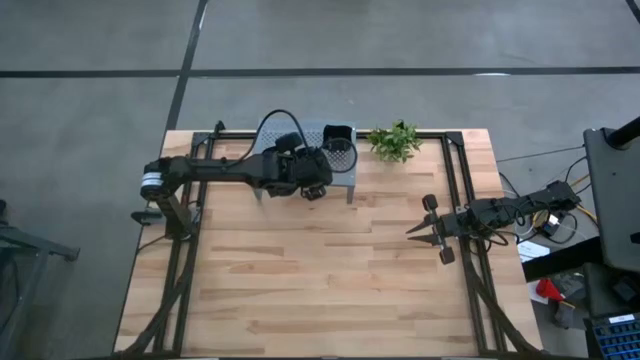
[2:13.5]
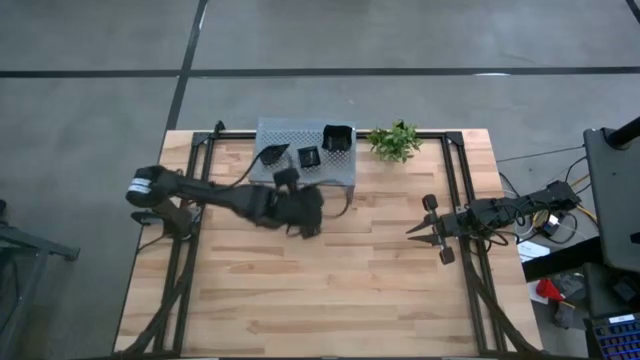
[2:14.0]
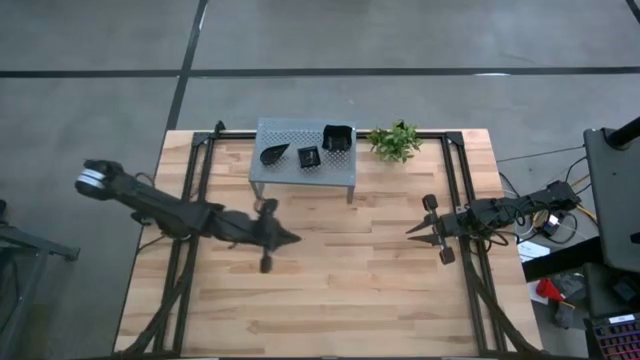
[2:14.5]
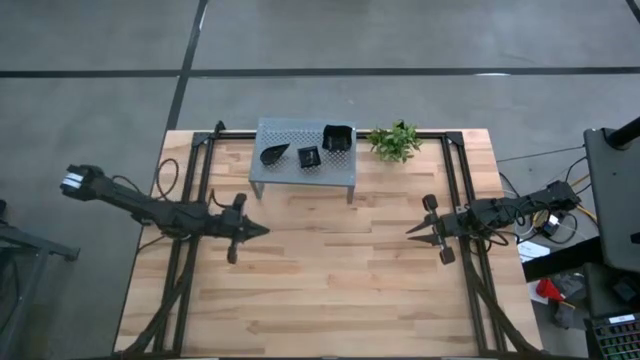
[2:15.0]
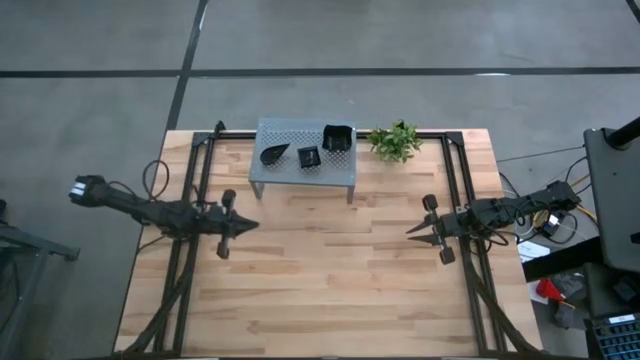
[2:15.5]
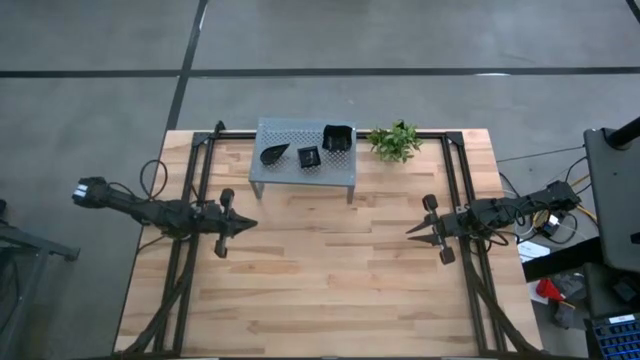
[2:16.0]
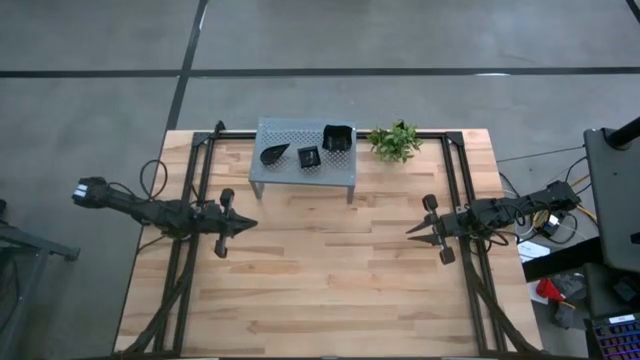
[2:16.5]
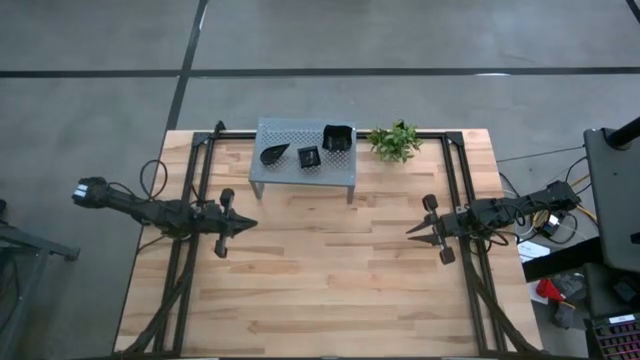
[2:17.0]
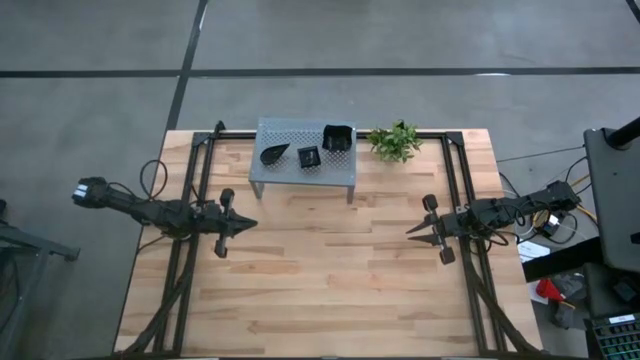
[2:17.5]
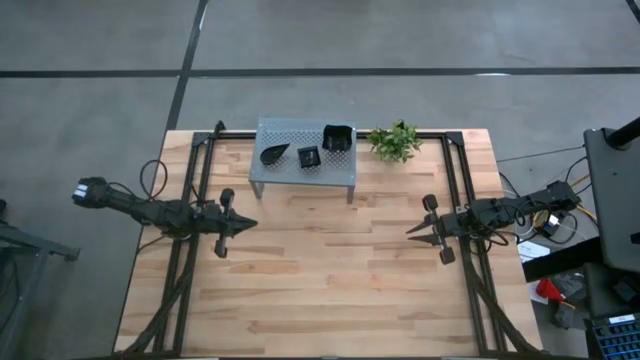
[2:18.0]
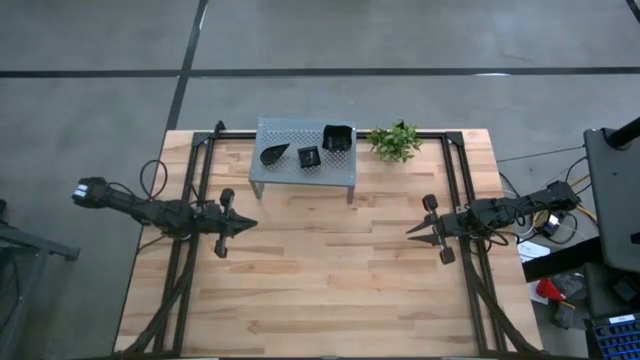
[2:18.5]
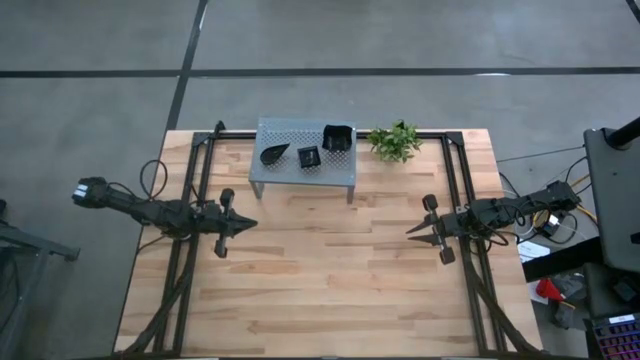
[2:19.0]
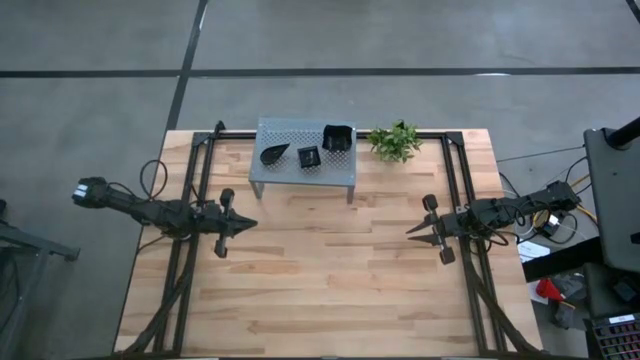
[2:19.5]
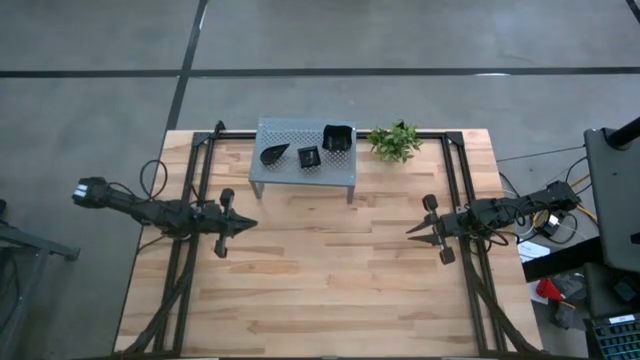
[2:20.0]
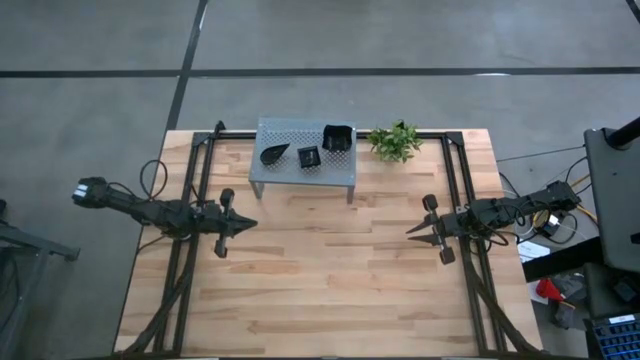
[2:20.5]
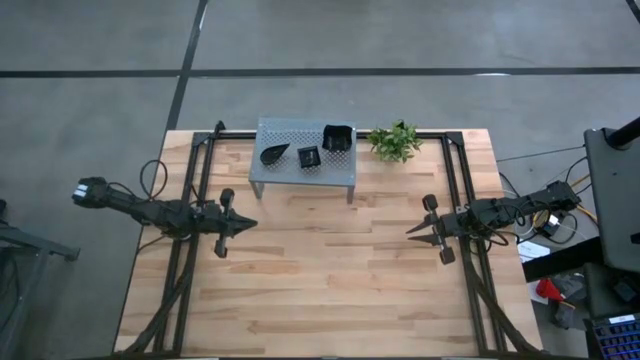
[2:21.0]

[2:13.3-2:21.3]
Task: Pick & Place Mini shaped plates
Return to Home Position

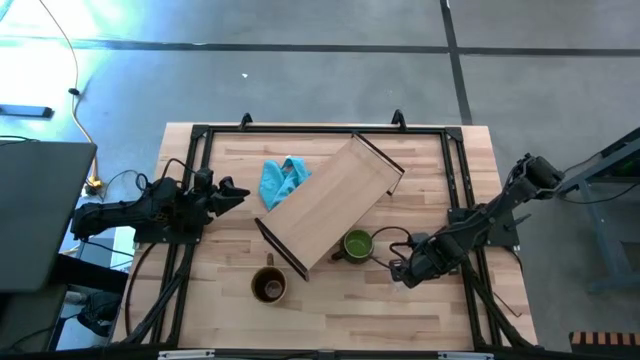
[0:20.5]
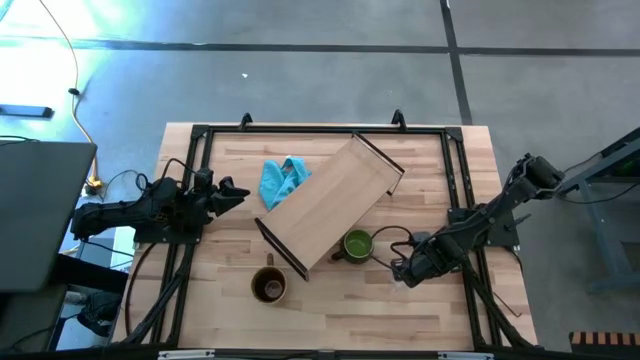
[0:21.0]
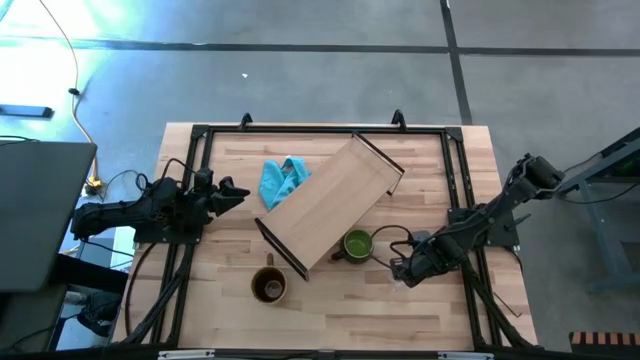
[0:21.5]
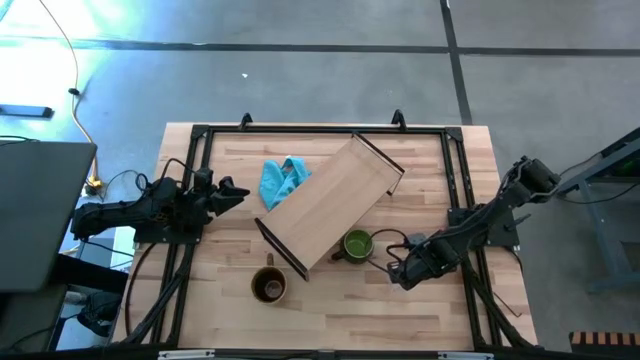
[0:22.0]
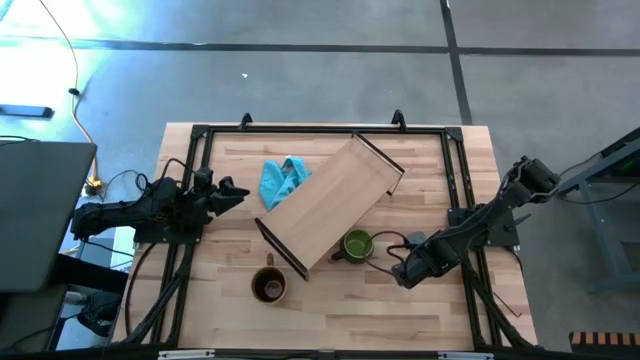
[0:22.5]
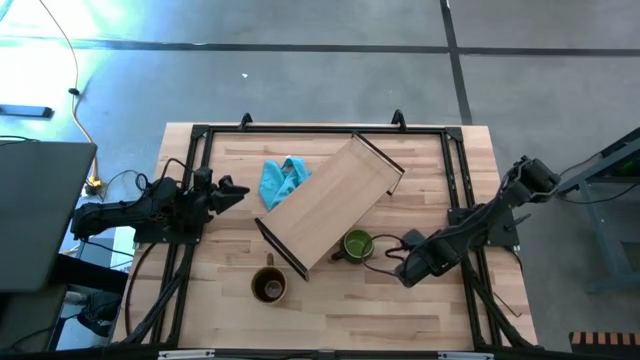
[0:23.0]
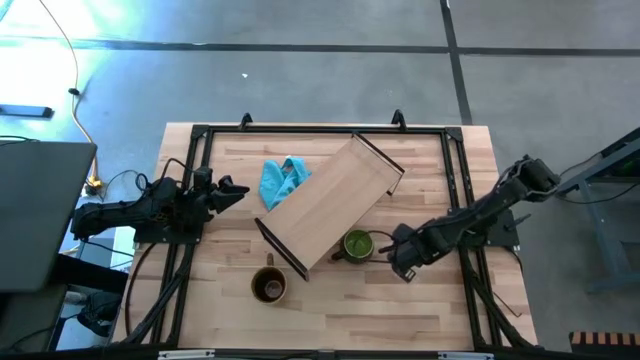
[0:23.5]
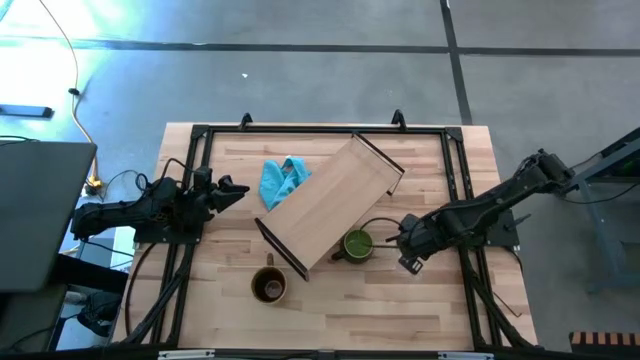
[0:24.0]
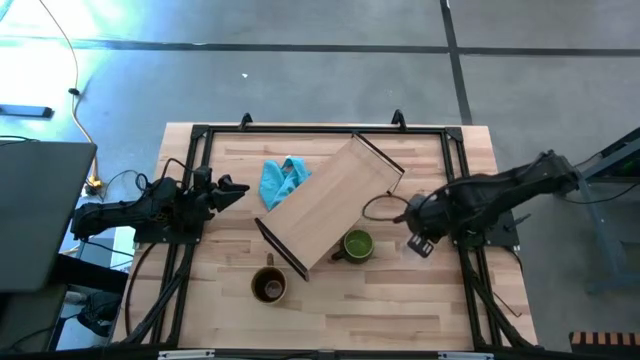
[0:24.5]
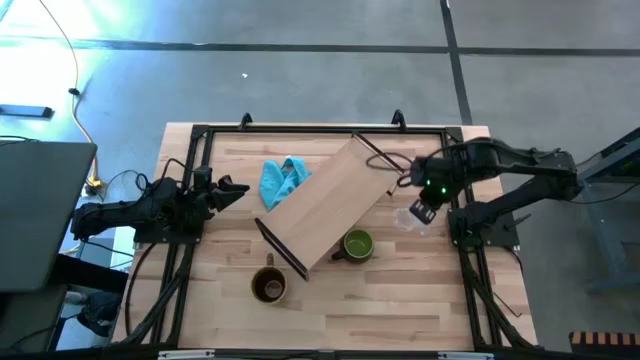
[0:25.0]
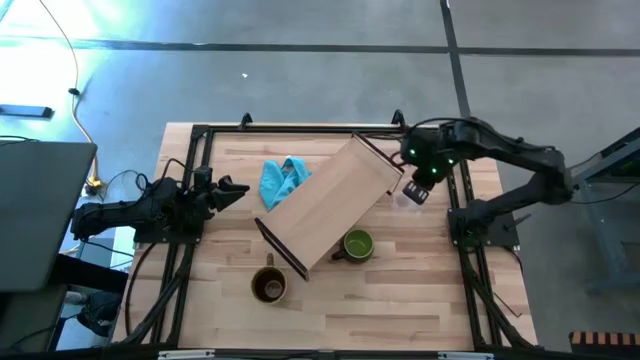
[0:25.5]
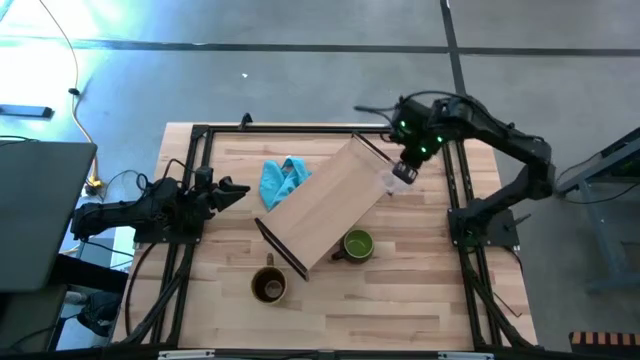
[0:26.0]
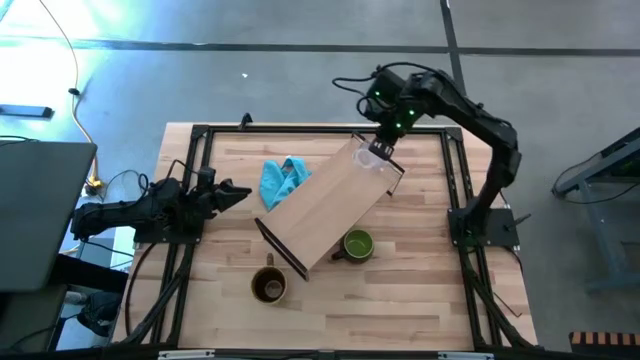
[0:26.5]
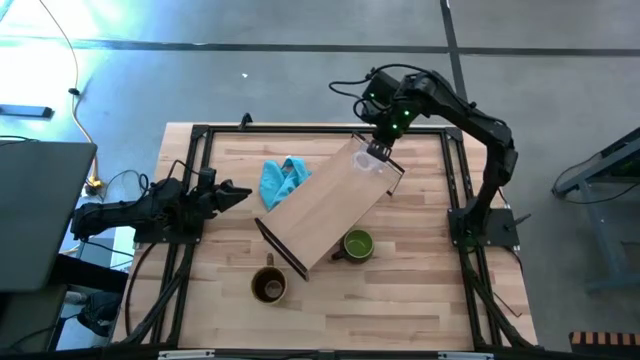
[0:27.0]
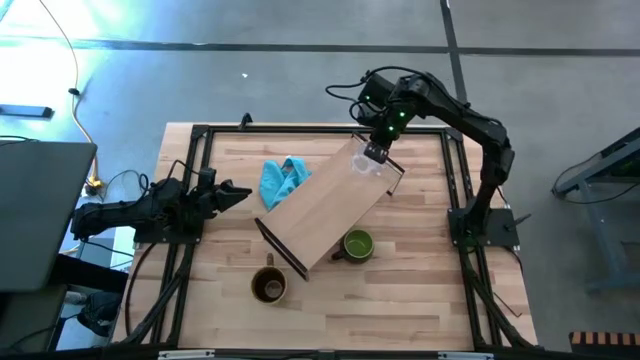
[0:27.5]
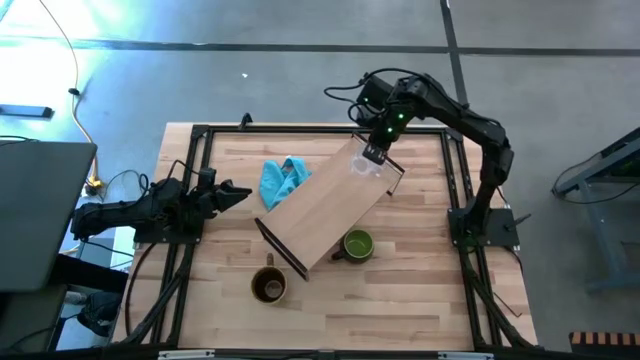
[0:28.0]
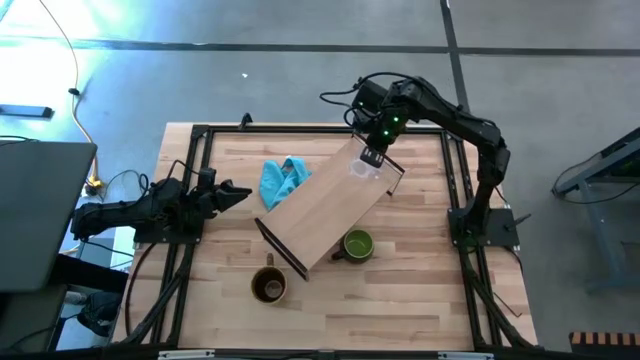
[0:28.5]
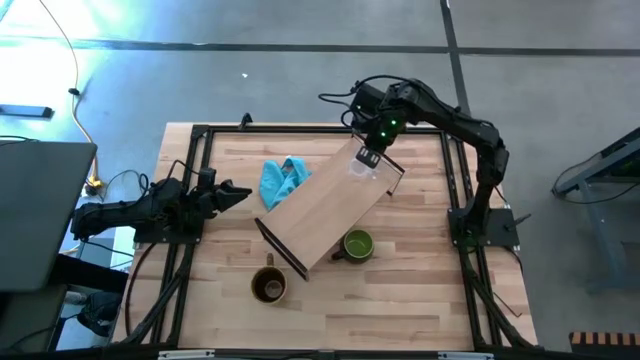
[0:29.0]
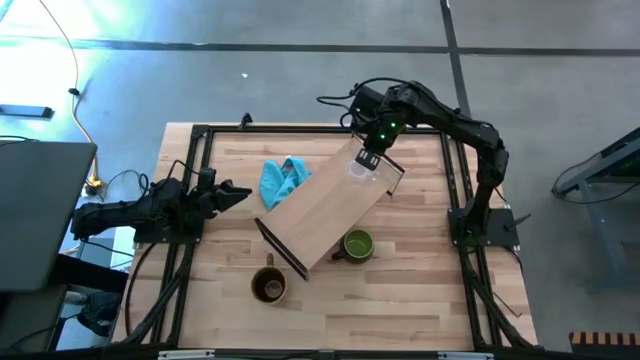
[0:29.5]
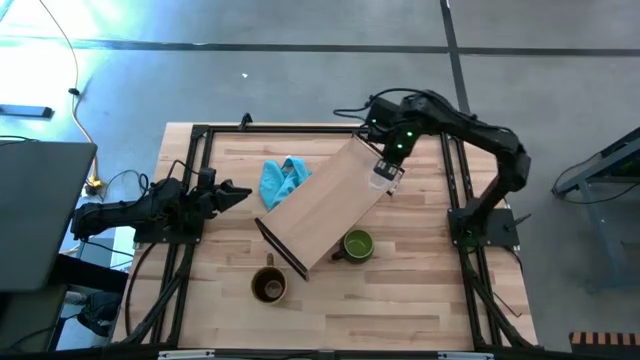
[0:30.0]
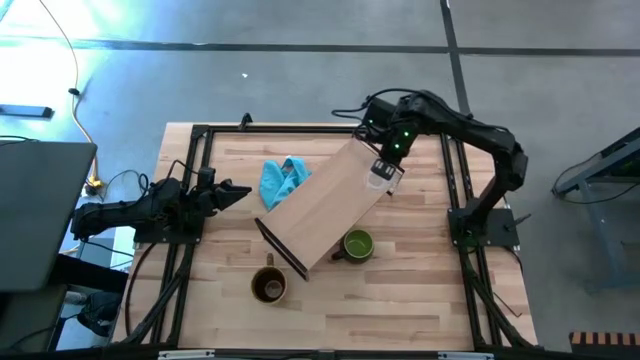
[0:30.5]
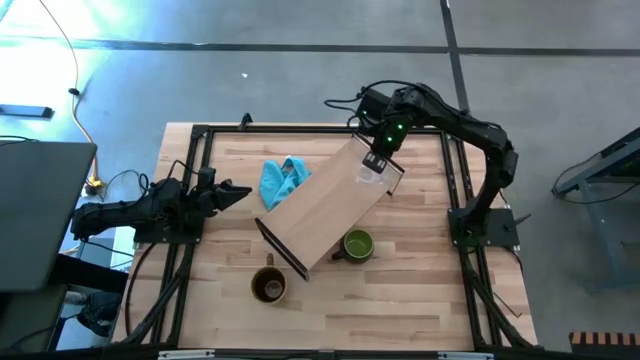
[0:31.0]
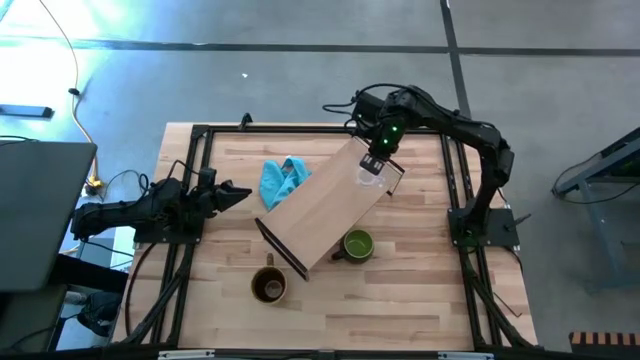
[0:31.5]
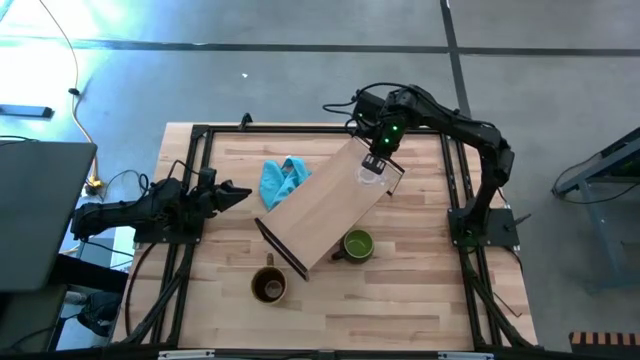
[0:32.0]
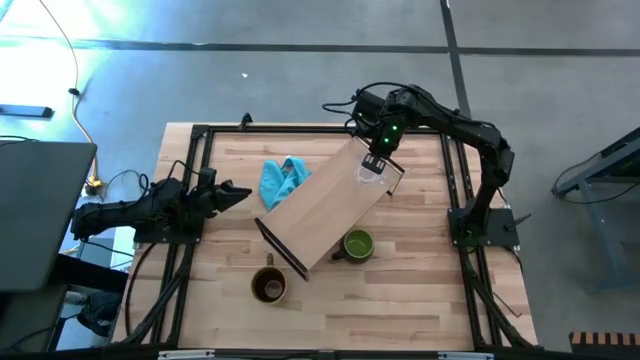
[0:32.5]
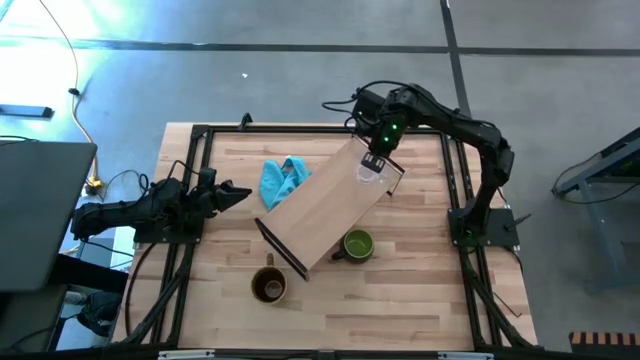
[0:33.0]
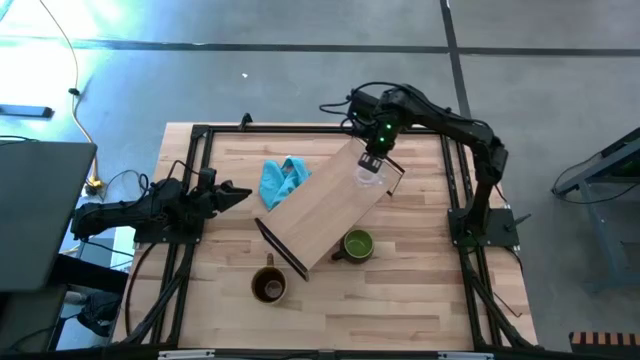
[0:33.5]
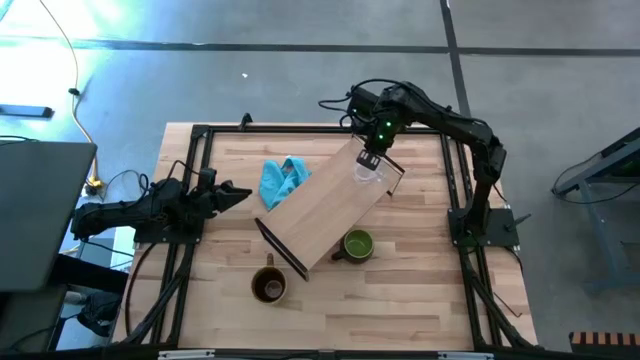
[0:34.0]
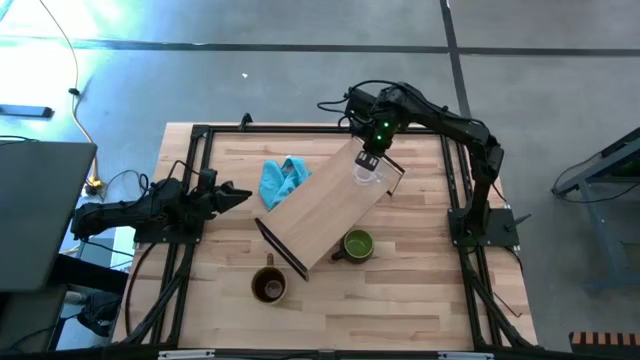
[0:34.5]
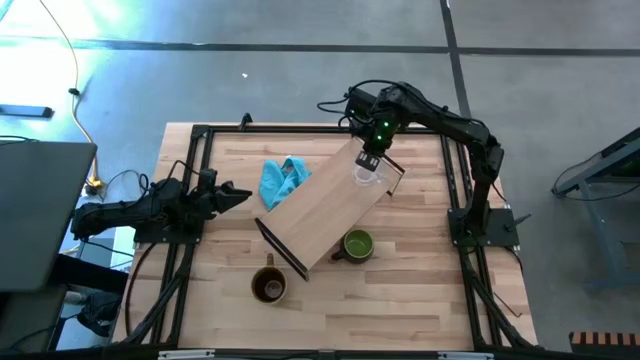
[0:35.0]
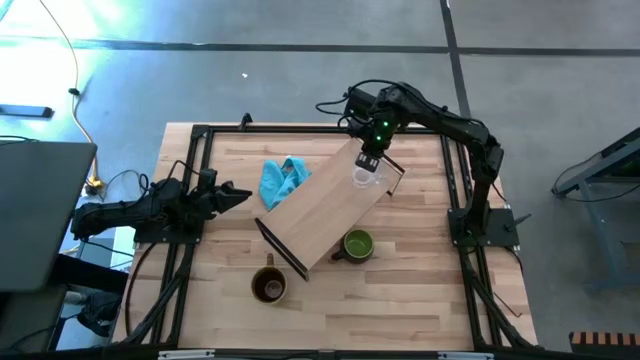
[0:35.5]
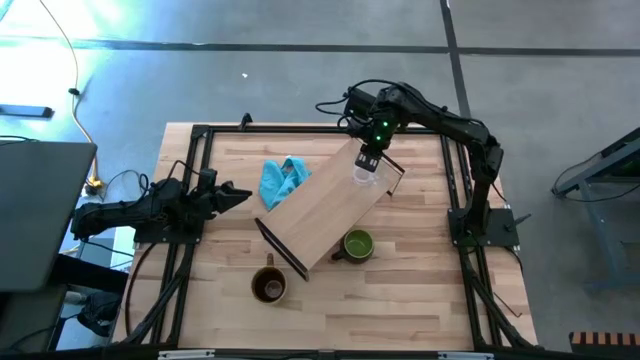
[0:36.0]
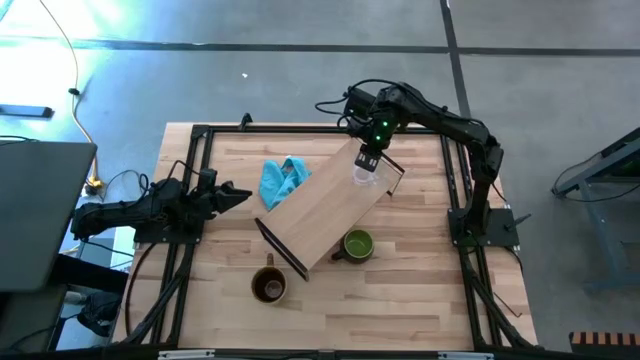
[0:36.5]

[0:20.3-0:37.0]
Task: Stack small to large cups/mugs on shelf
Put the transparent mug on the shelf
